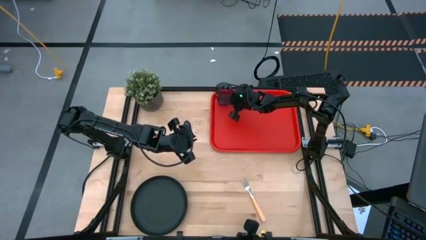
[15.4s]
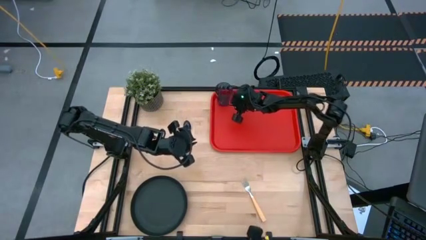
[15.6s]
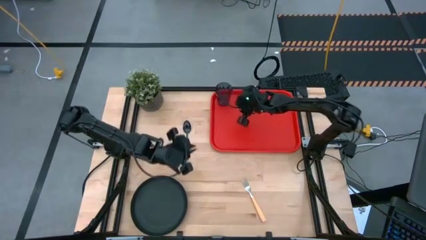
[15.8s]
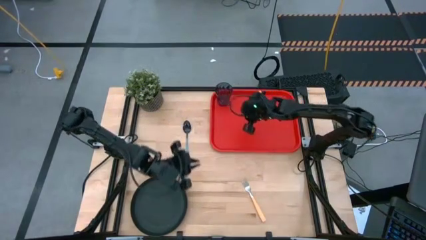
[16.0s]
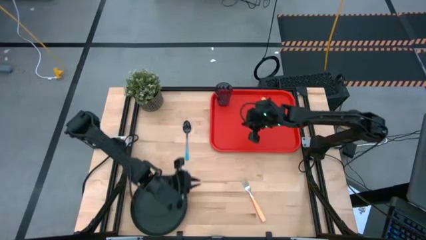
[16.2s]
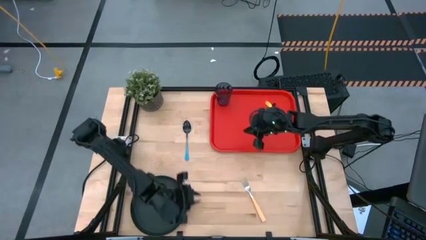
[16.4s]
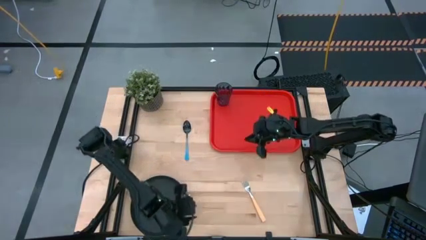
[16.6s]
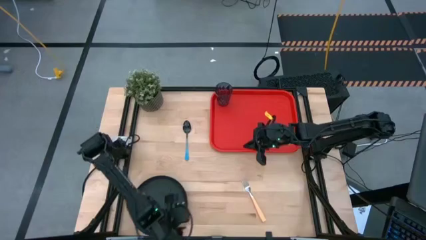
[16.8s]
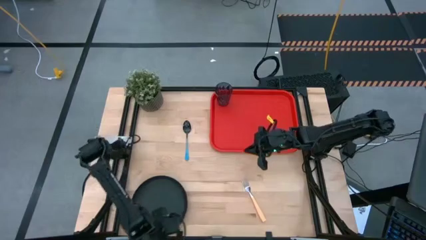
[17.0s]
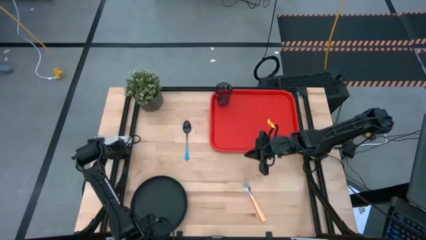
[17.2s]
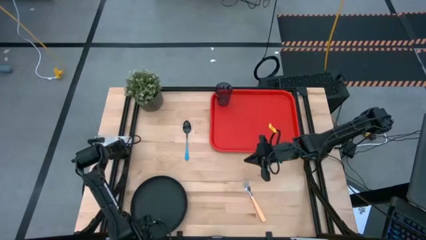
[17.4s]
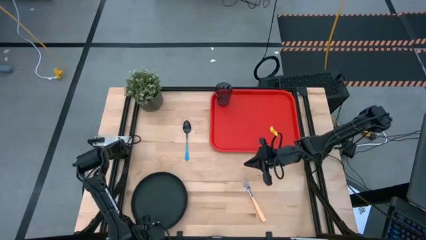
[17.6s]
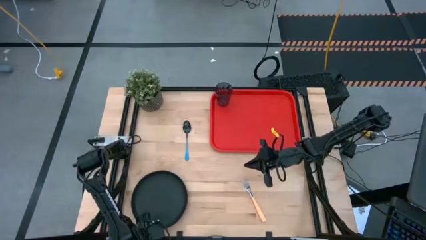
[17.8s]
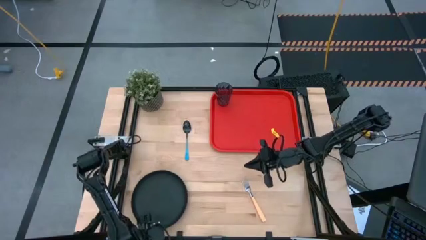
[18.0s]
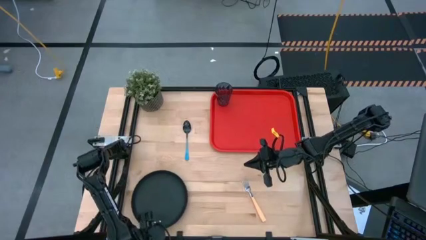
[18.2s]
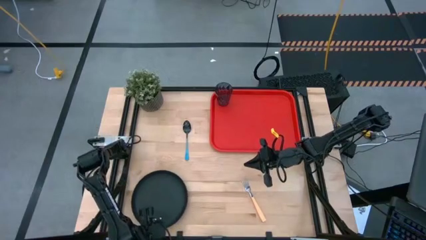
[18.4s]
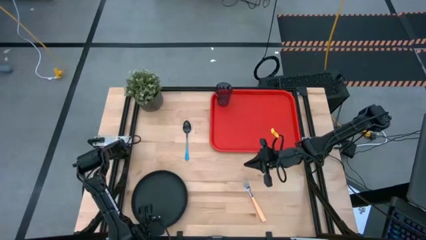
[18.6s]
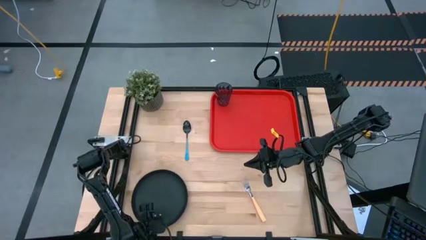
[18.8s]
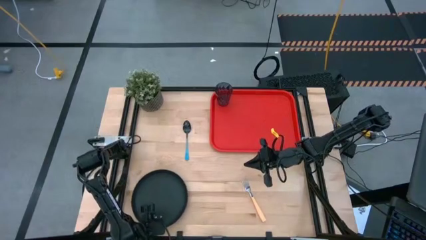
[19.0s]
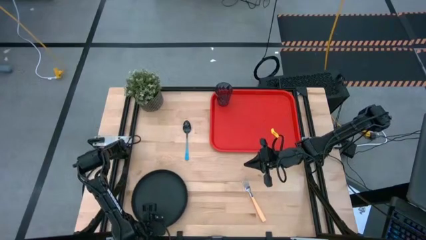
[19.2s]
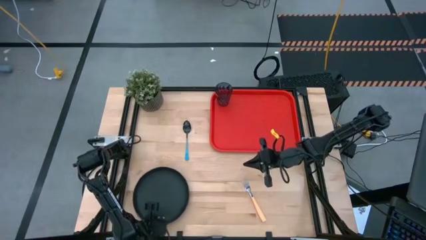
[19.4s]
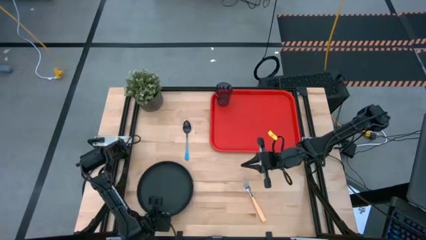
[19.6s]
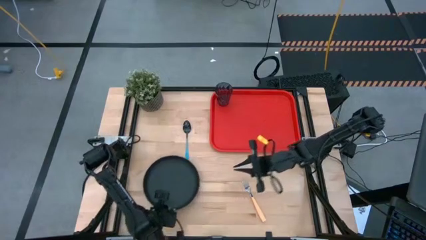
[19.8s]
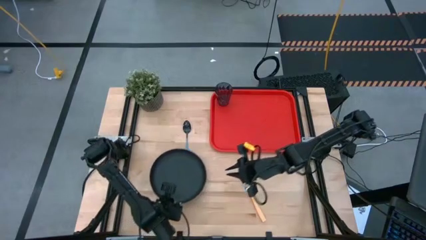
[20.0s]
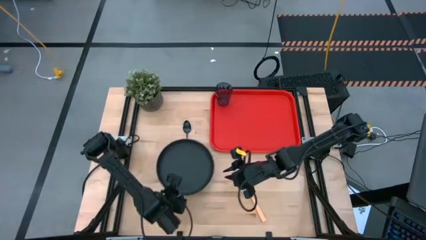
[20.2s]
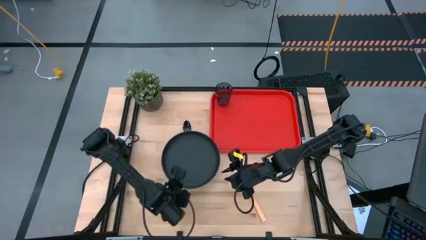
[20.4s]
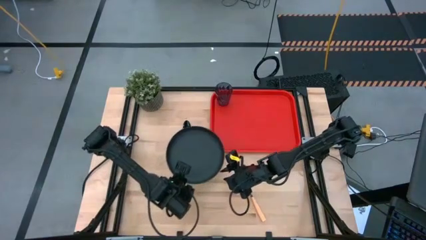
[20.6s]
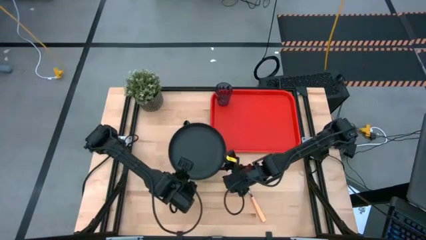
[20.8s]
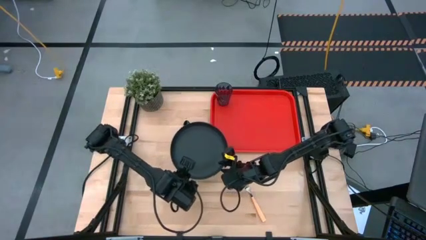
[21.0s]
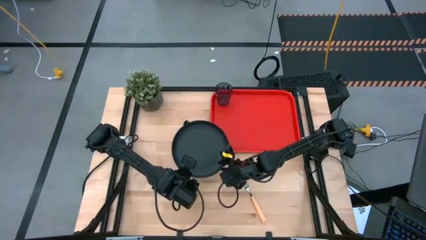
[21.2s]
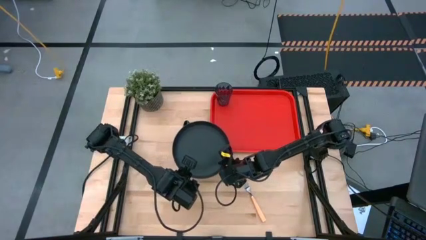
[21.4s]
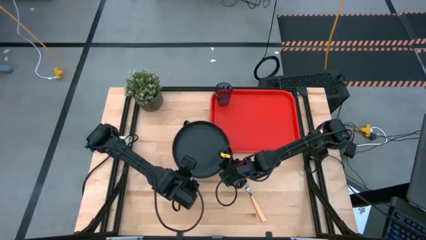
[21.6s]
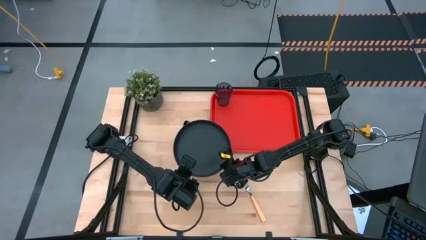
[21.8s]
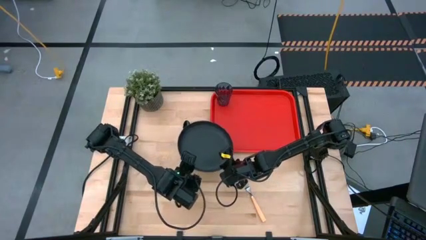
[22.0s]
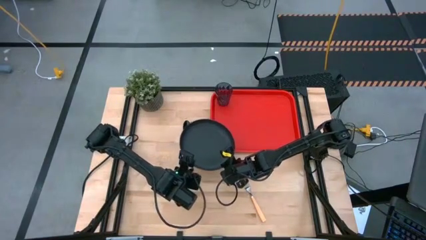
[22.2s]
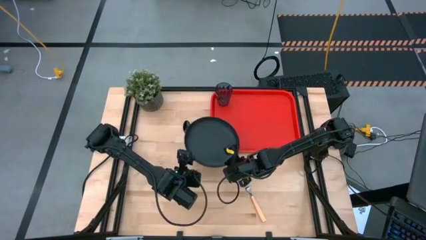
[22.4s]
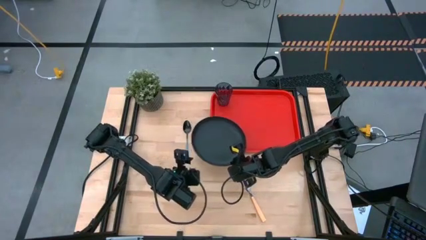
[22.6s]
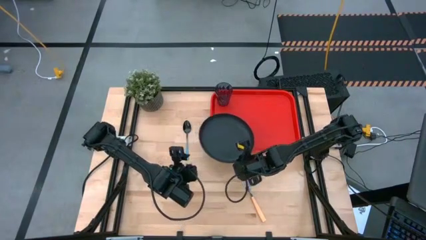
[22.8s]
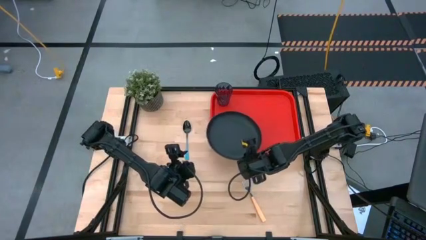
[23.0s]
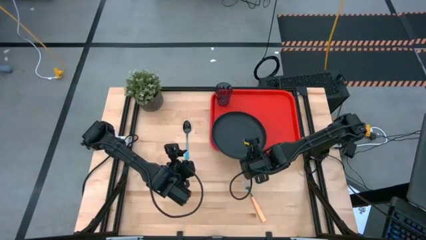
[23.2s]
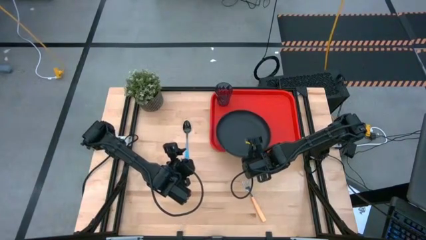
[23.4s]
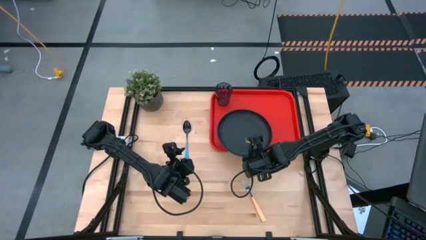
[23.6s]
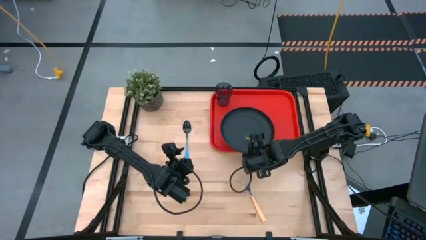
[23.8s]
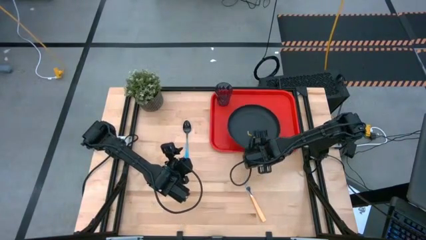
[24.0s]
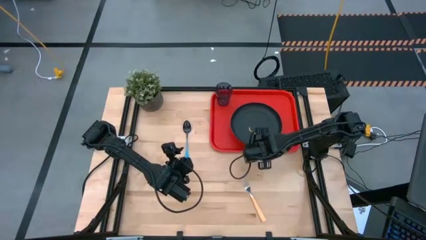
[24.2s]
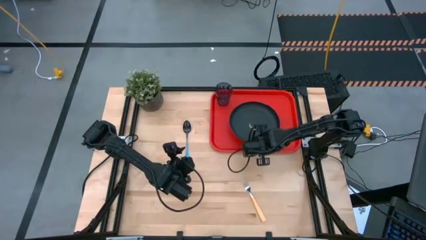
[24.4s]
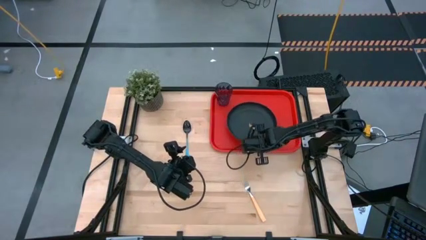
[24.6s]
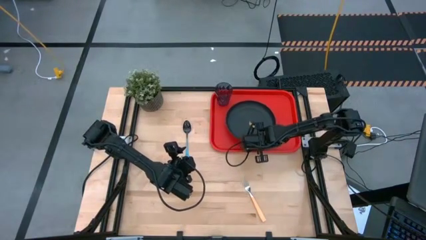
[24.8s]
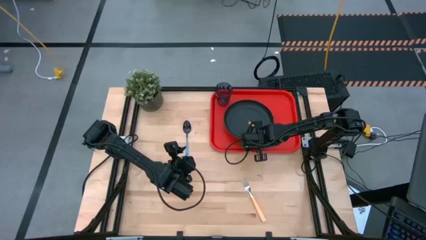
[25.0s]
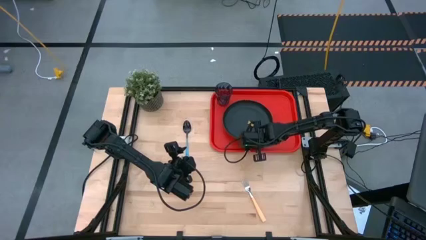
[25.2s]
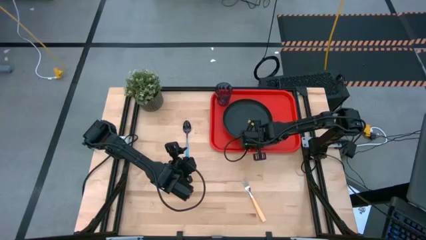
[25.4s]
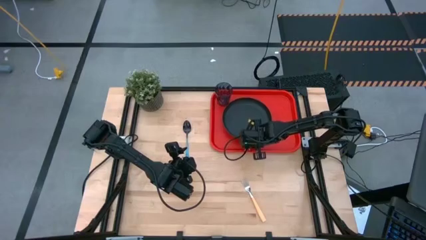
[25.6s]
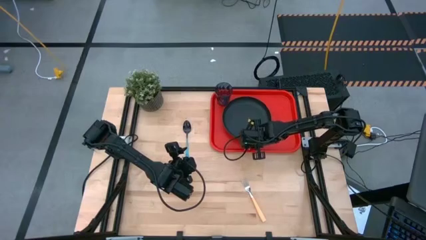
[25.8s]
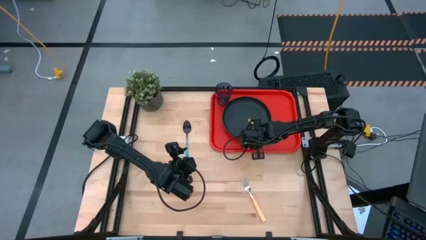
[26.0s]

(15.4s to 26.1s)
Task: Pick and place plate/cup/fork/spoon on tray
Put the black plate on the serving tray to the bottom right of the blue cup

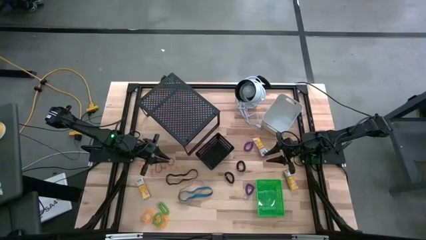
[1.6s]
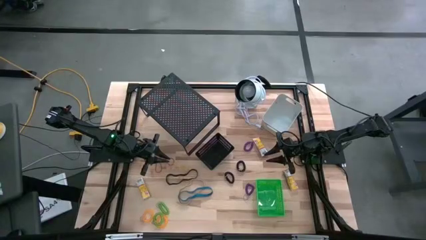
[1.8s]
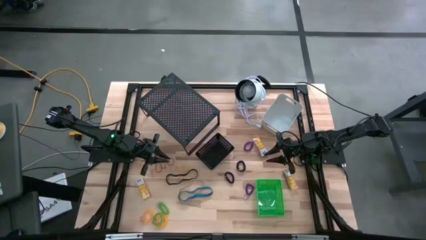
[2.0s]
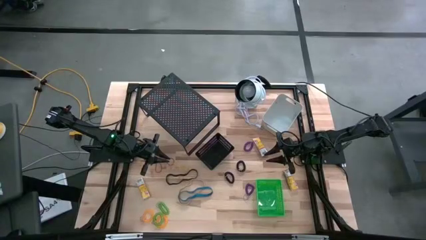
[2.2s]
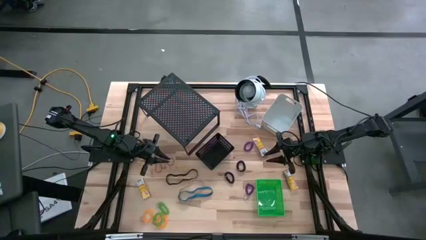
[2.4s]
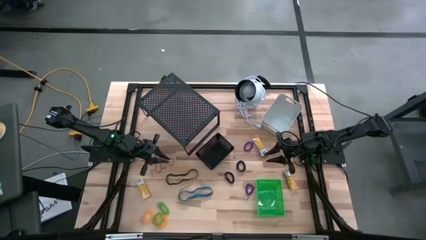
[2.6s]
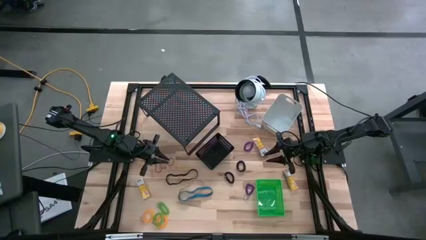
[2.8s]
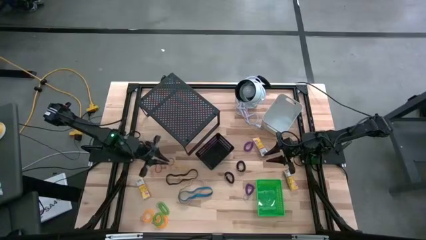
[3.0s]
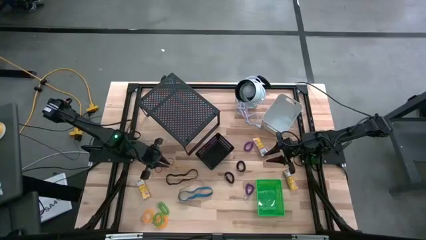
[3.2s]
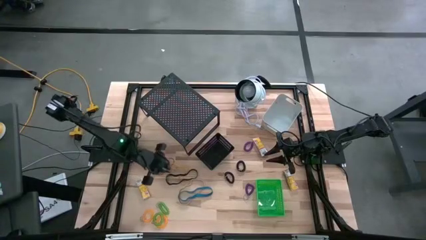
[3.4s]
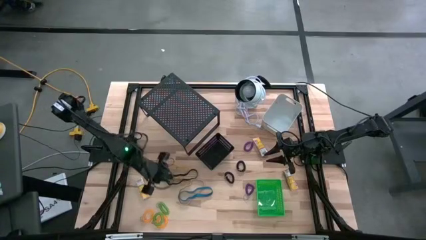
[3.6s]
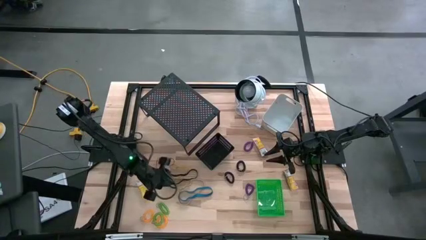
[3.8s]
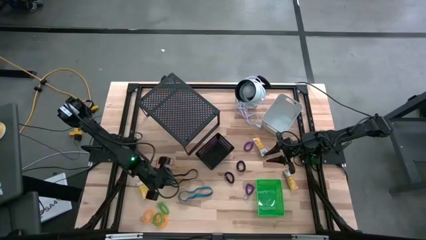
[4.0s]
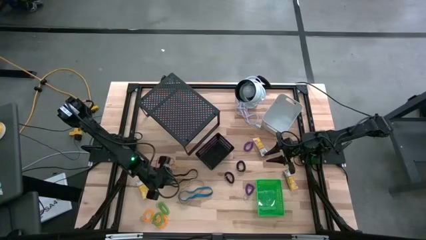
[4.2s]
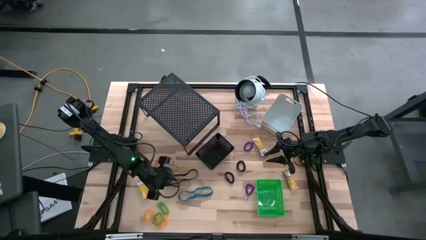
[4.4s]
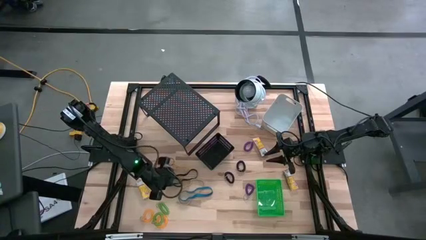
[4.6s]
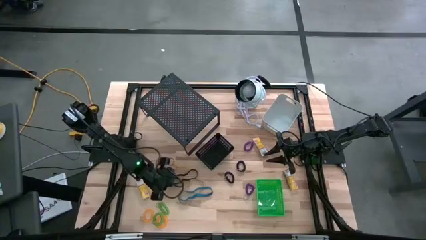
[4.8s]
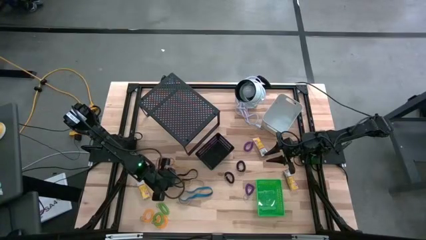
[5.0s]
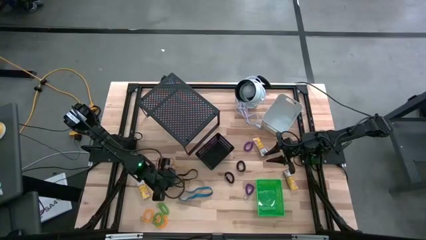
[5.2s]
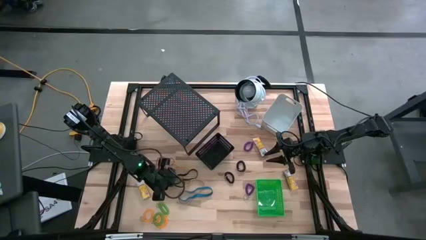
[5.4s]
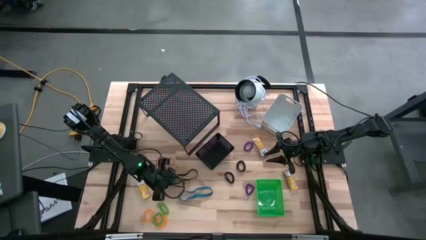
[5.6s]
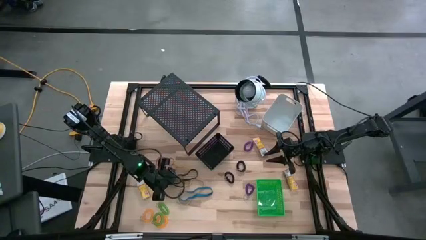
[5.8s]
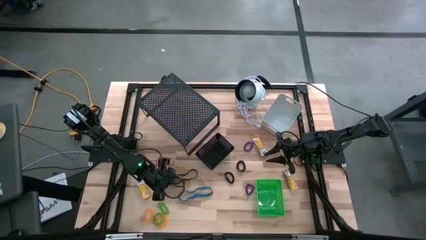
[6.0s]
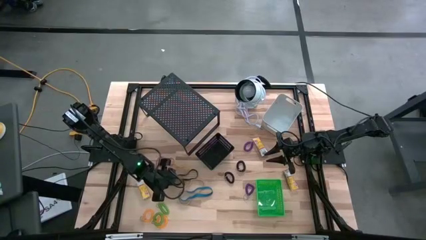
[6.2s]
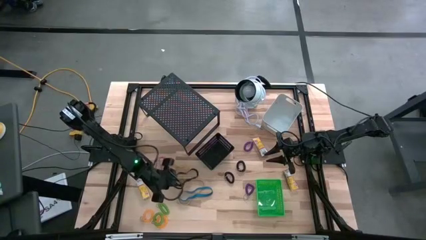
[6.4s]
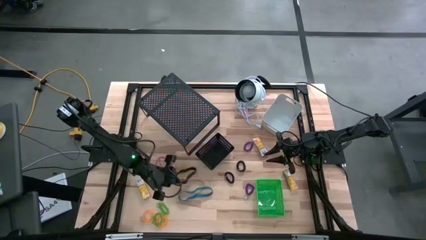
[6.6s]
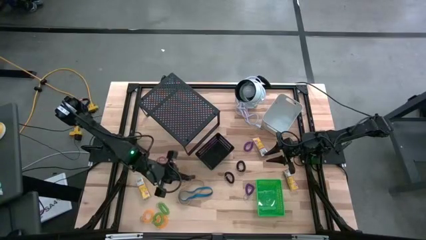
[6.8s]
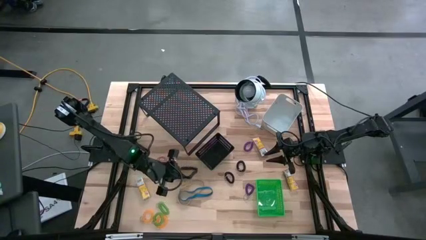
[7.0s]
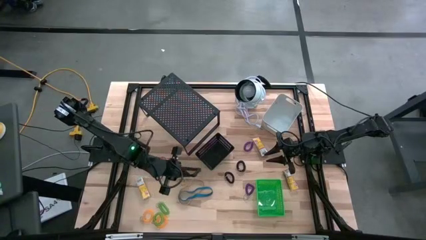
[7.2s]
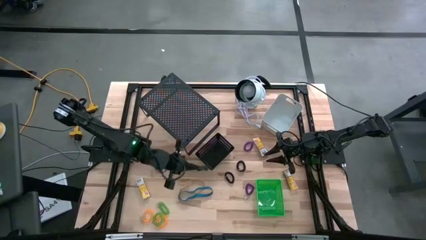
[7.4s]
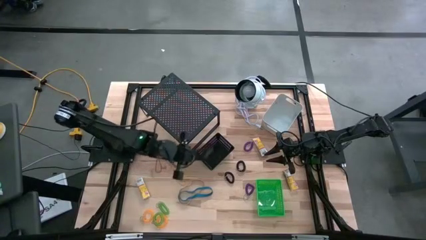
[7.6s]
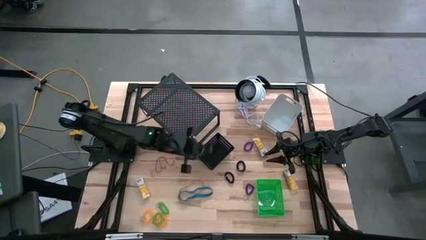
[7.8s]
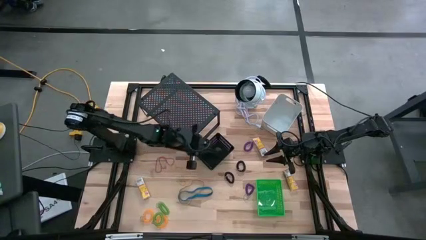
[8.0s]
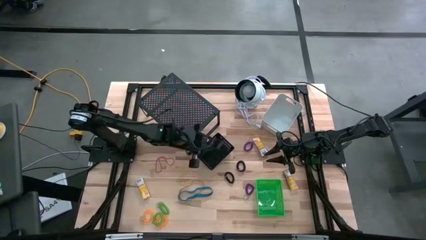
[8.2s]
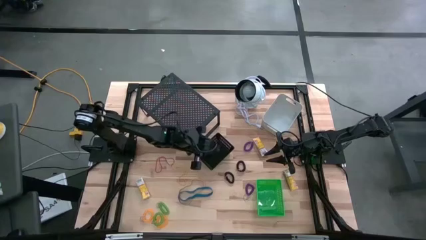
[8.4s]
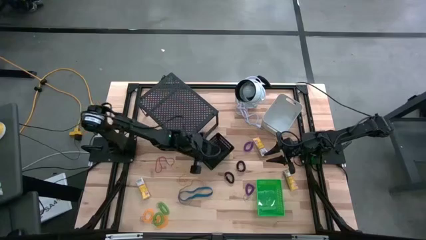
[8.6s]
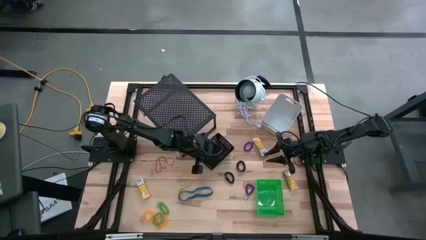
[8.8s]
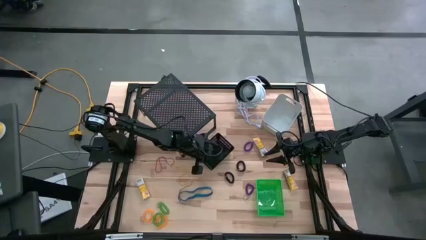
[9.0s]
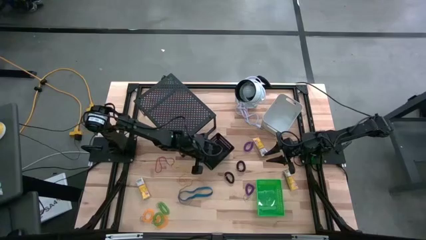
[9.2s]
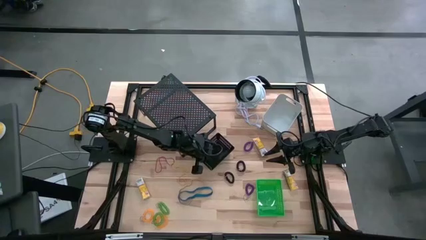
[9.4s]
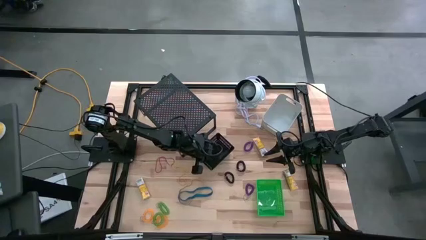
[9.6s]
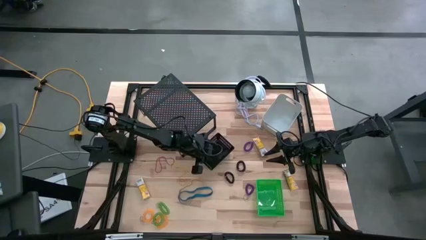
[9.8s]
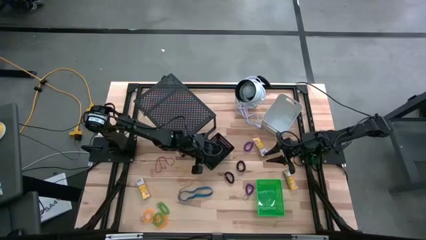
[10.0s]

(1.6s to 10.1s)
Task: Pick & Place Office Desk Supplies
Put the black rubber band into the black bin
